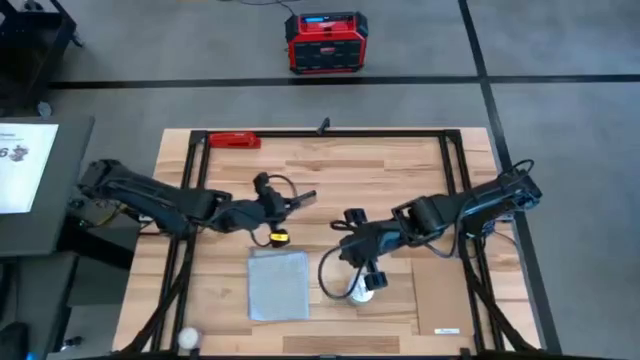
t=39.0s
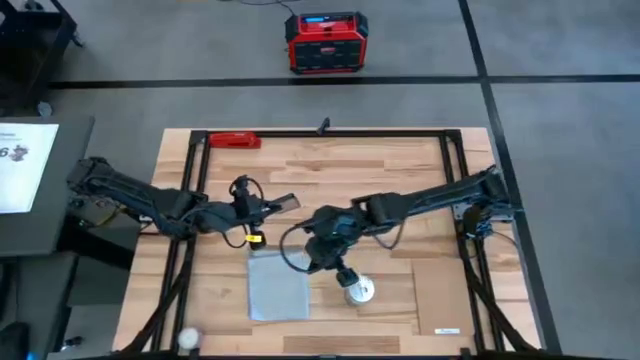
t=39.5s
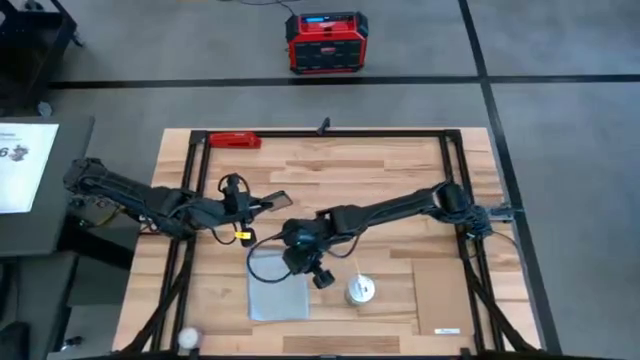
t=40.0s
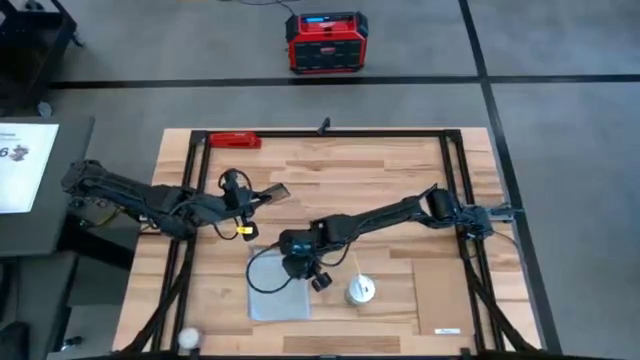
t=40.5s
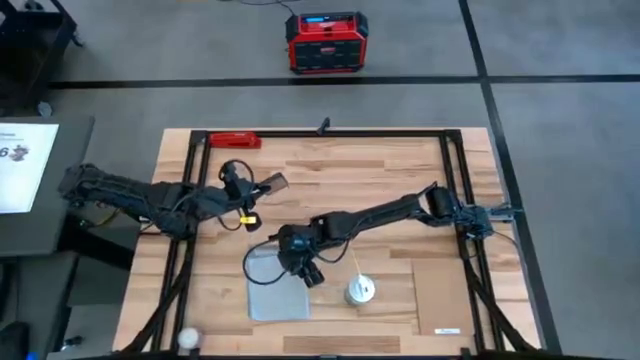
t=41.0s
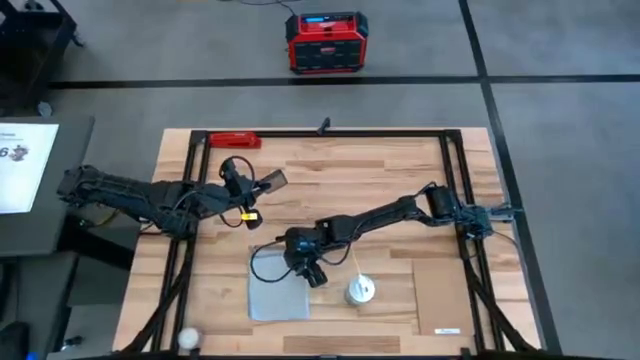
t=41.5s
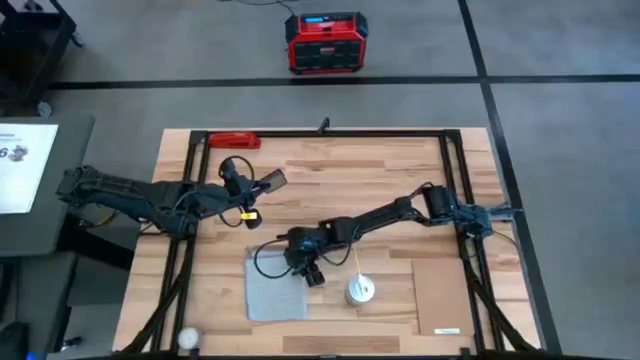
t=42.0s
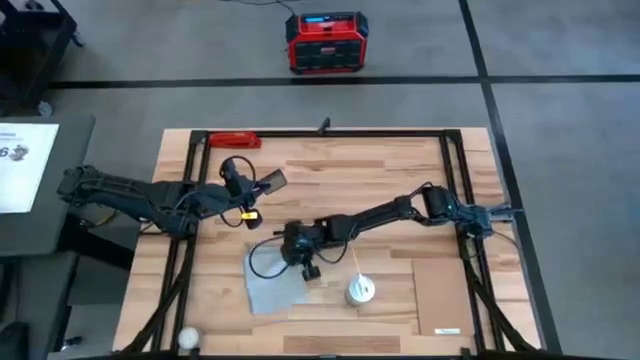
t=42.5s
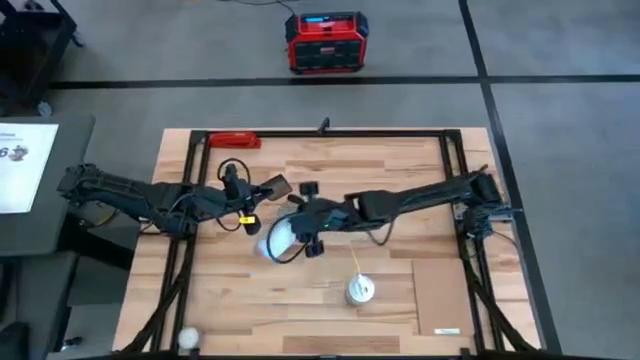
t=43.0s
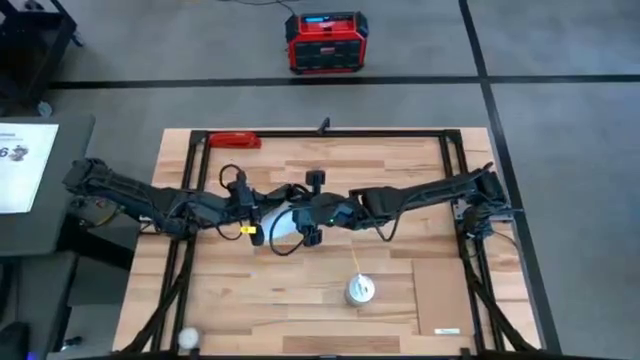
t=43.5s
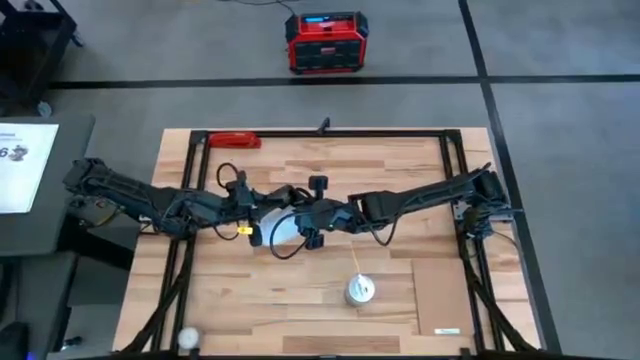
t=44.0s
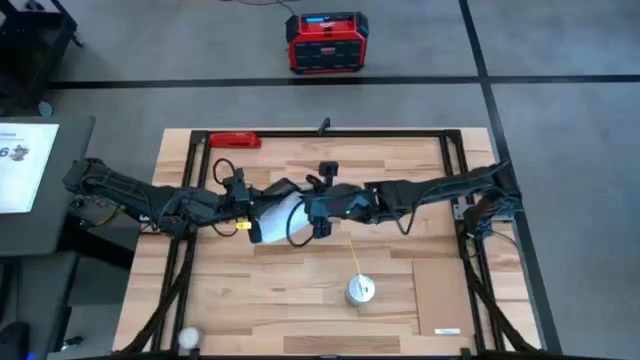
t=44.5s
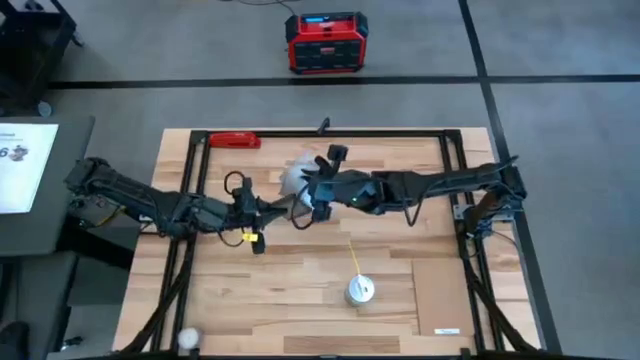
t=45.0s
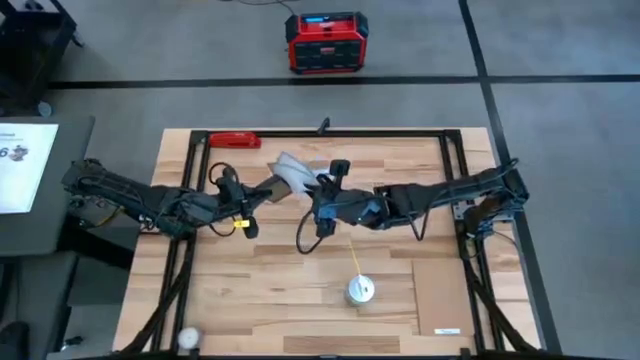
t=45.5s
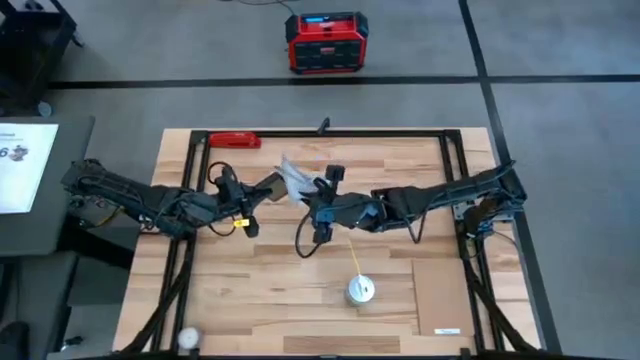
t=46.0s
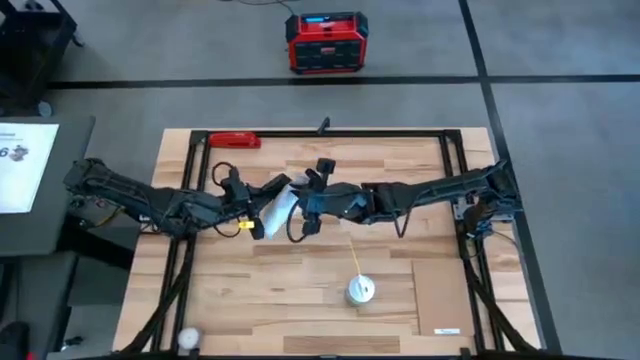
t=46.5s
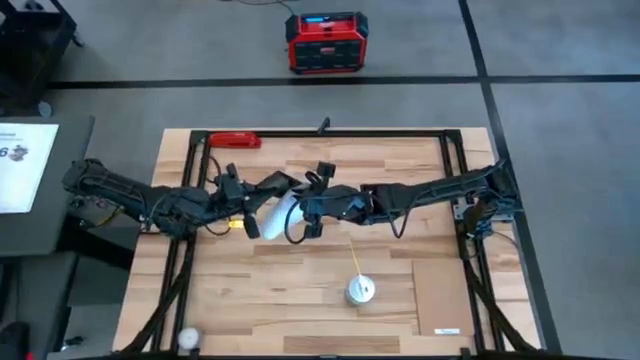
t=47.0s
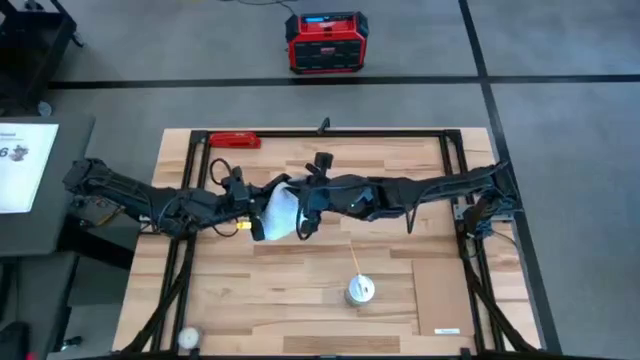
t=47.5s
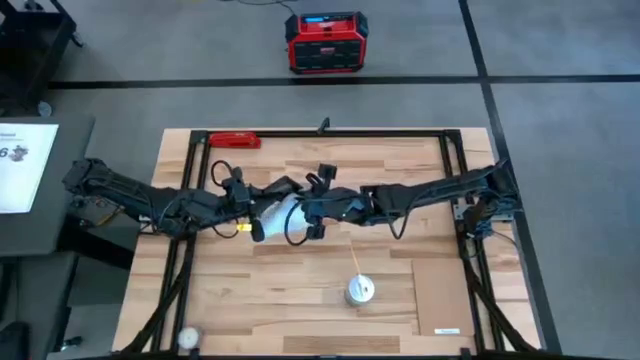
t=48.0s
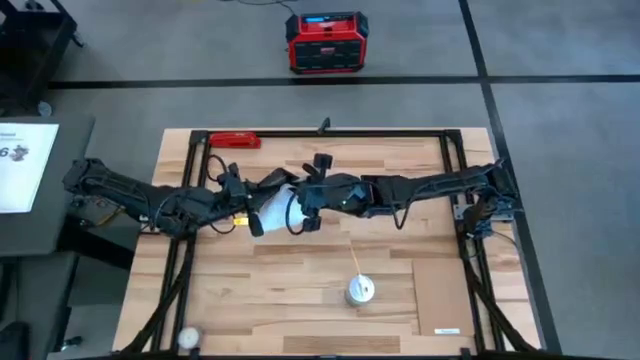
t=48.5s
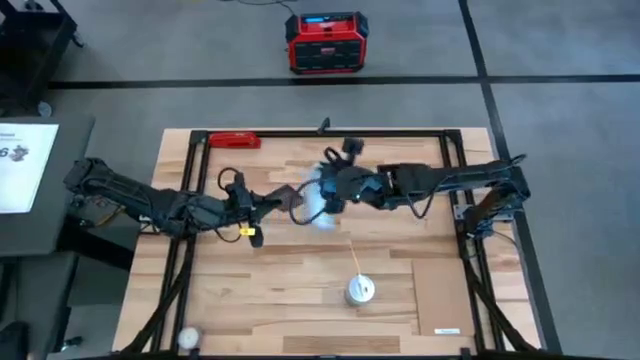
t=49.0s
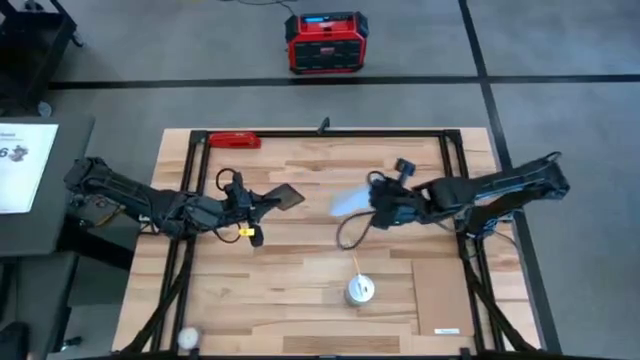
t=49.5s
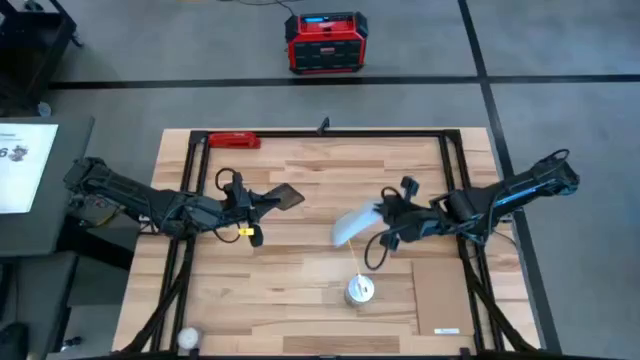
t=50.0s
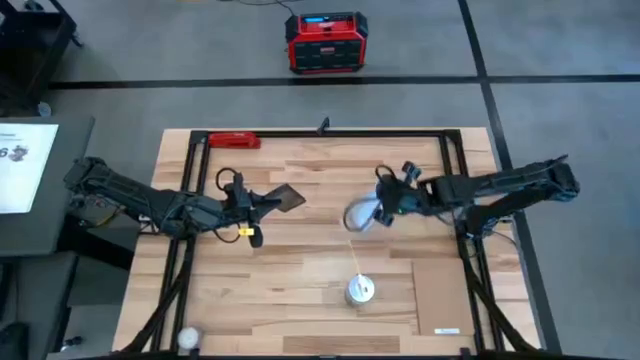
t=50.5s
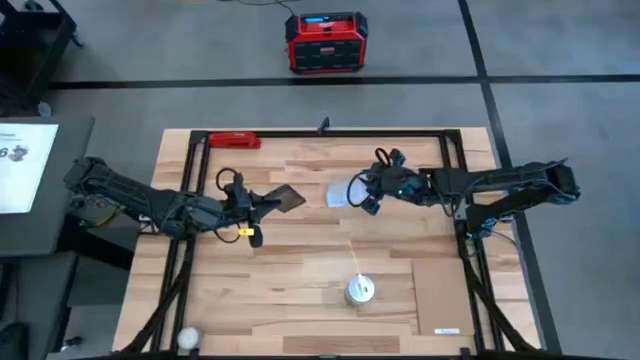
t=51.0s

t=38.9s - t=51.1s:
Task: Apply microfiber cloth
Wipe the front of the black phone with the white microfiber cloth

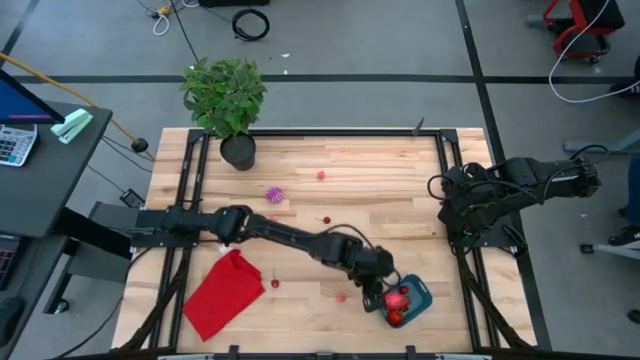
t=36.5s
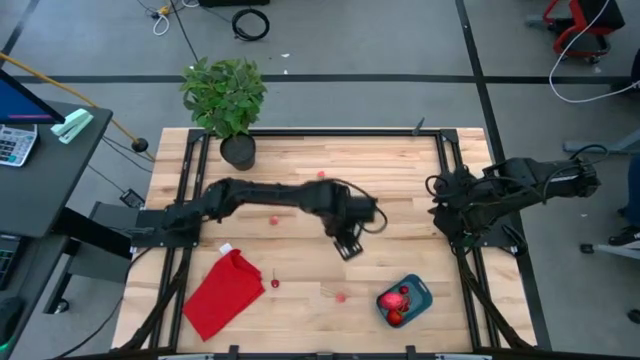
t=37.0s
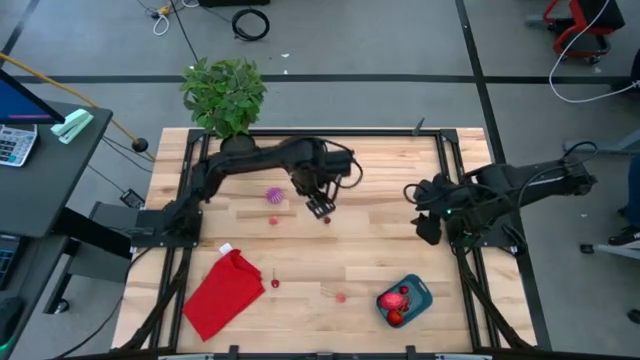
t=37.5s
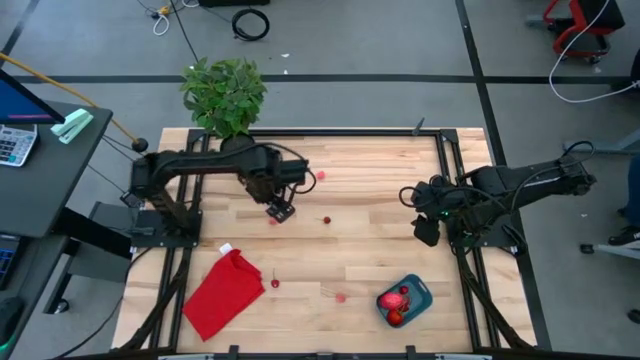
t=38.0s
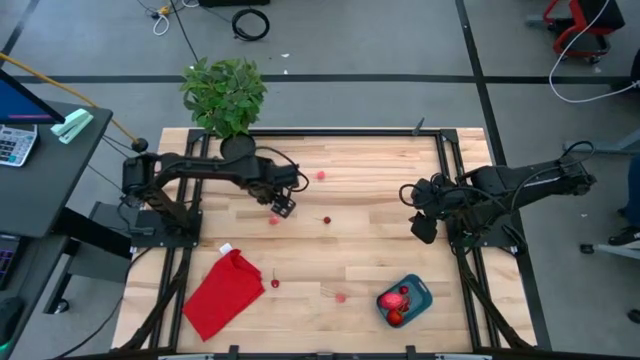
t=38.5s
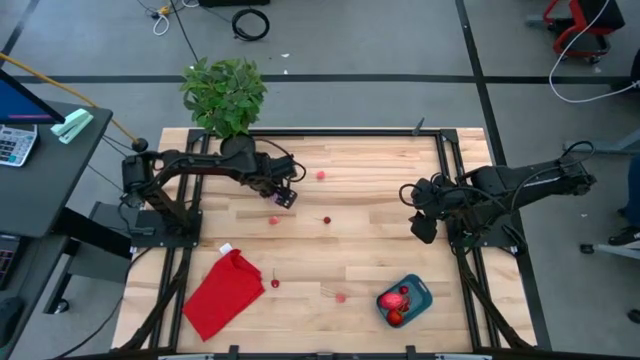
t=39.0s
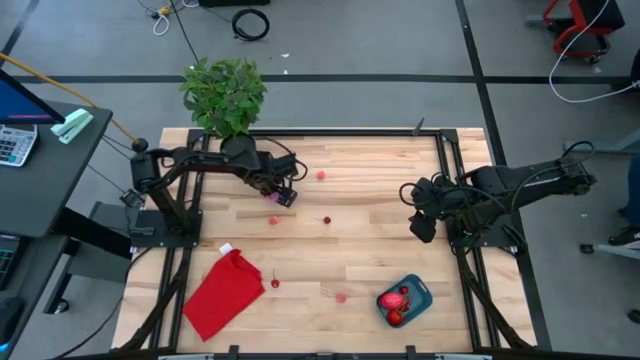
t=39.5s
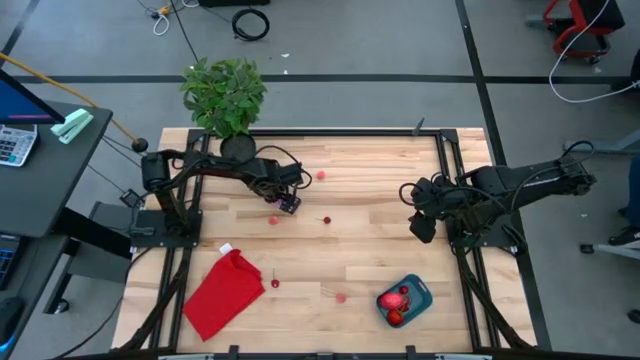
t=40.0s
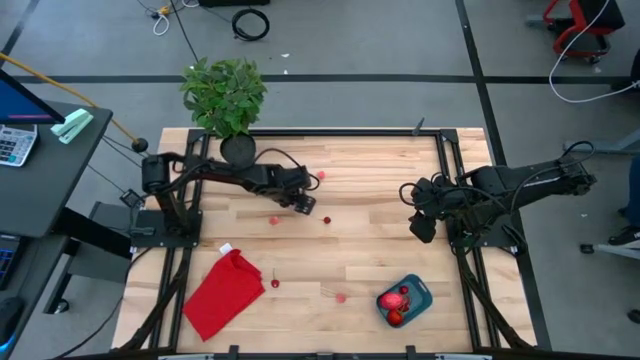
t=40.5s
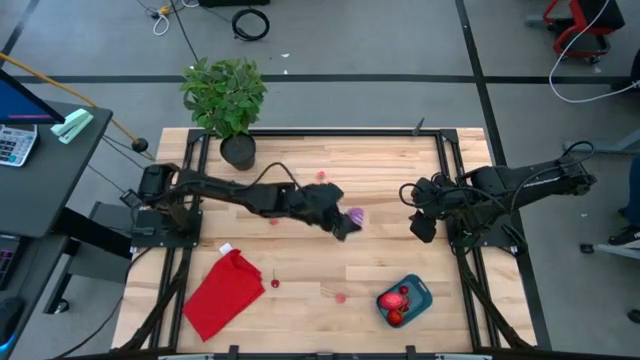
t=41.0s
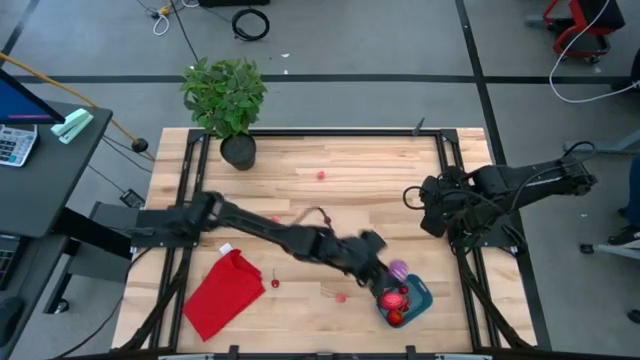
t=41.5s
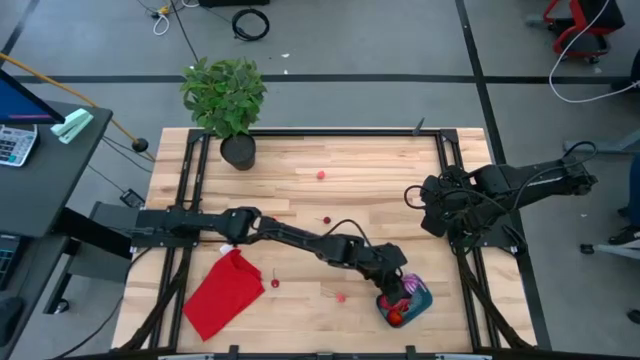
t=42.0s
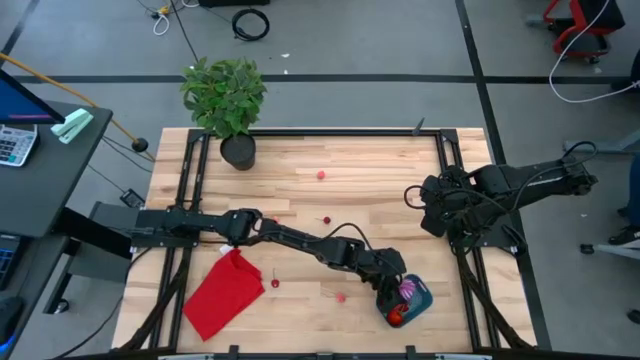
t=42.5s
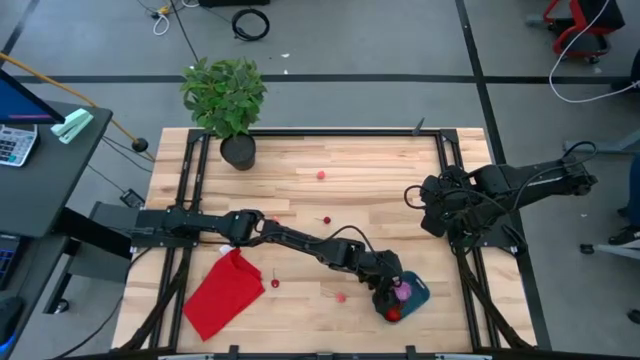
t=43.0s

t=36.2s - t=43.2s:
Task: Pick and placing Produce into tupperware
Put the onion into the bin

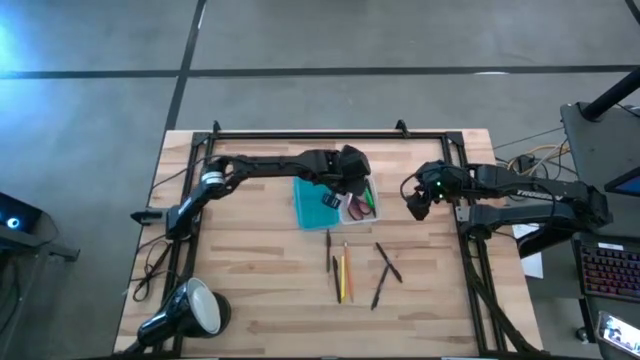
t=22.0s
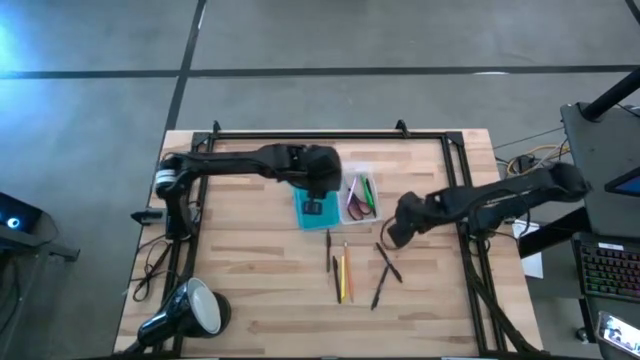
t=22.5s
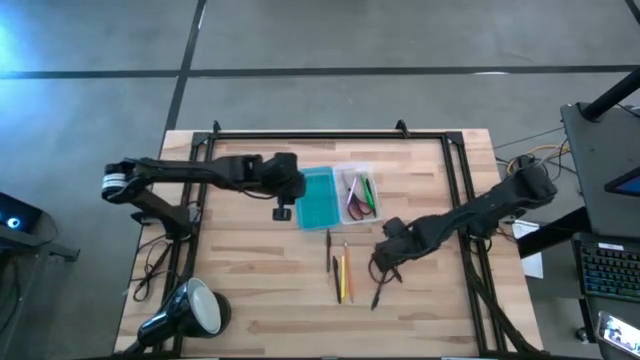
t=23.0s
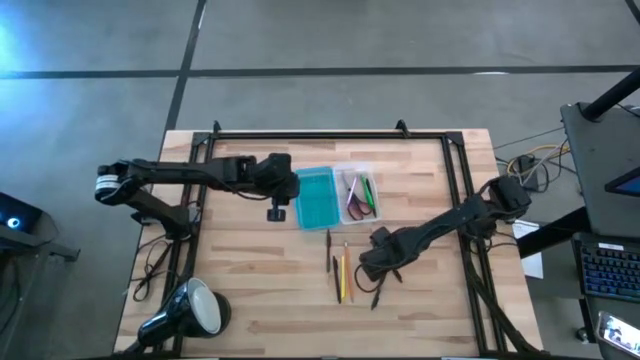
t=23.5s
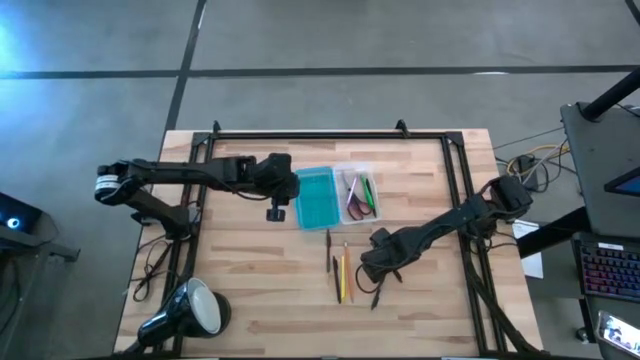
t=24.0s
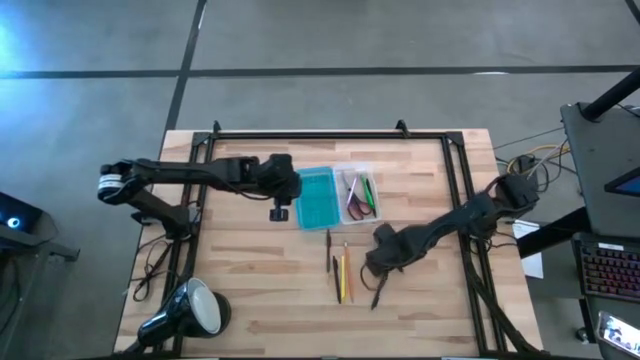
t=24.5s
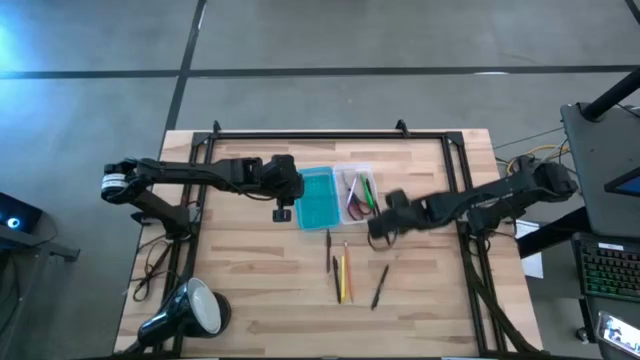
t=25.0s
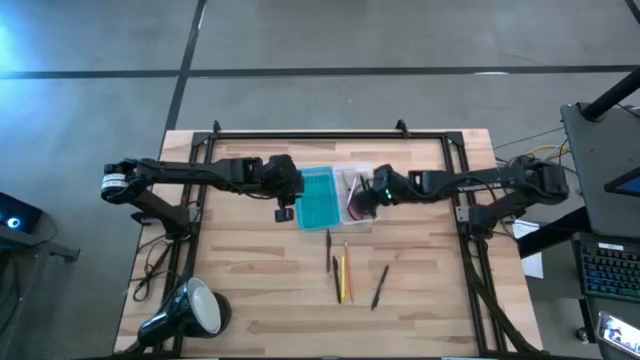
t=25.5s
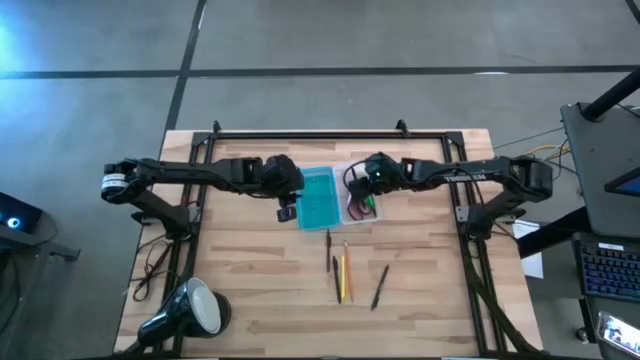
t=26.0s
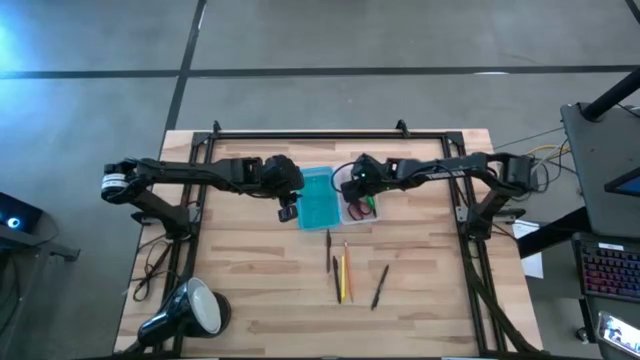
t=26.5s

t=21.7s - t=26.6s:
Task: Pick & place school supplies into a supply box
Put the black pen into the blue supply box
